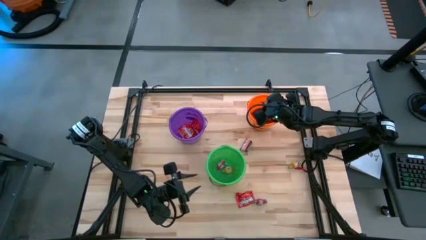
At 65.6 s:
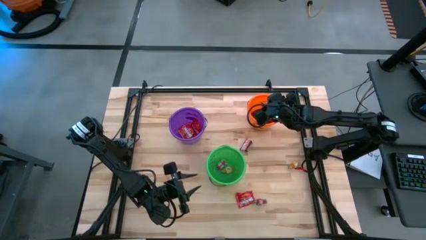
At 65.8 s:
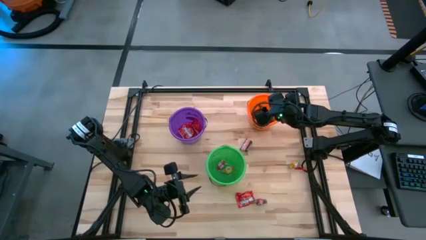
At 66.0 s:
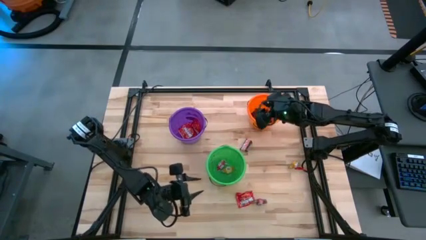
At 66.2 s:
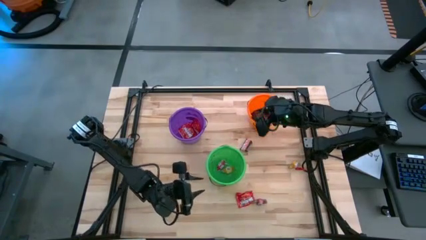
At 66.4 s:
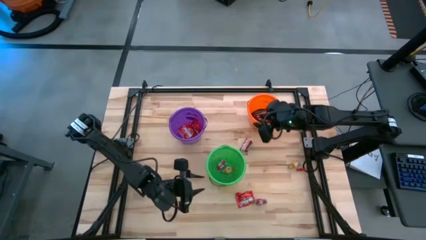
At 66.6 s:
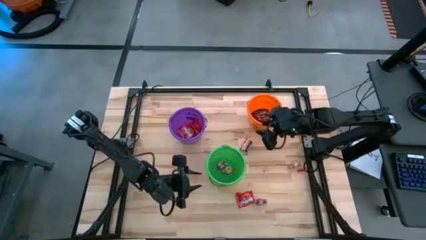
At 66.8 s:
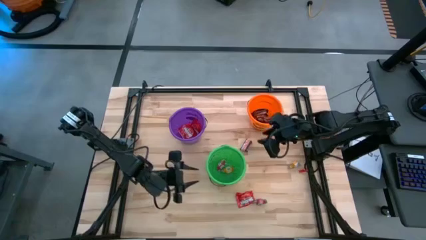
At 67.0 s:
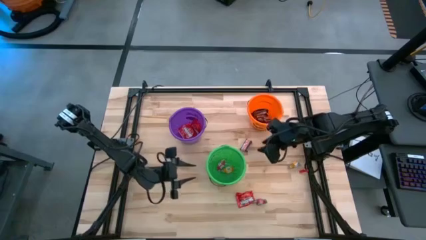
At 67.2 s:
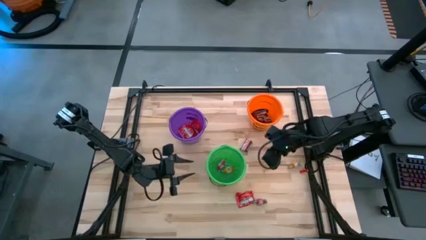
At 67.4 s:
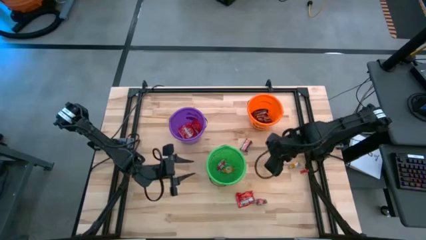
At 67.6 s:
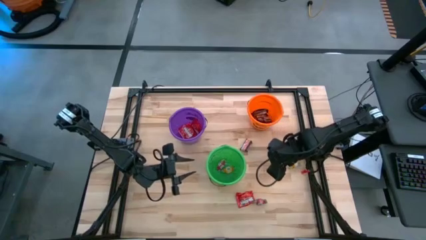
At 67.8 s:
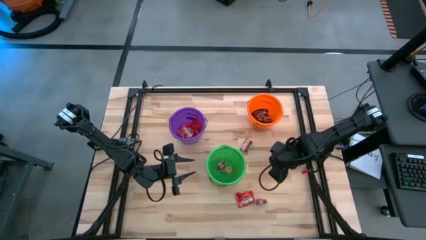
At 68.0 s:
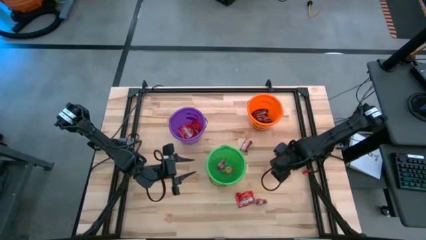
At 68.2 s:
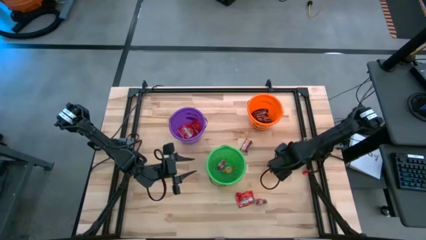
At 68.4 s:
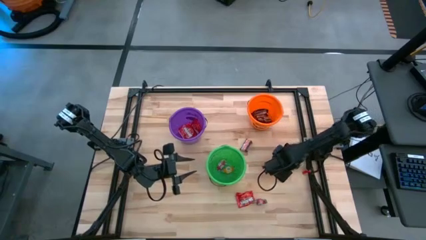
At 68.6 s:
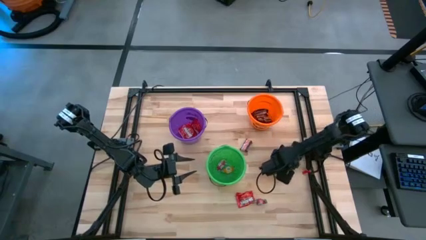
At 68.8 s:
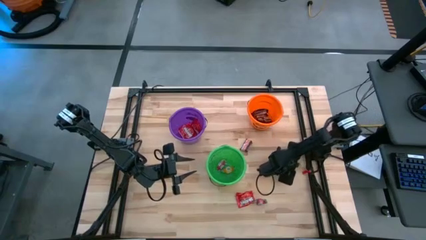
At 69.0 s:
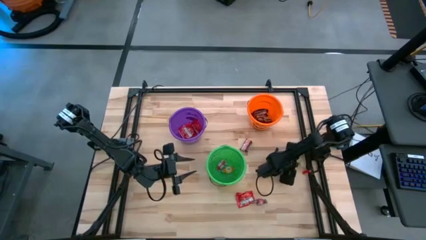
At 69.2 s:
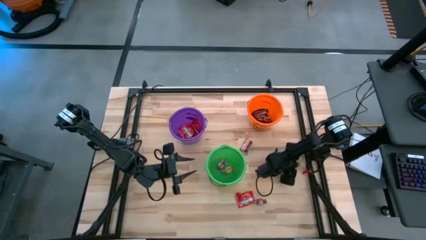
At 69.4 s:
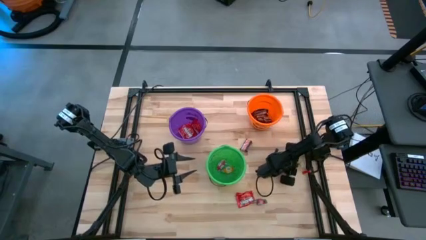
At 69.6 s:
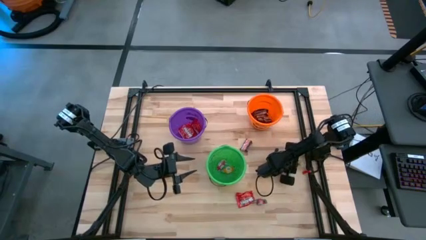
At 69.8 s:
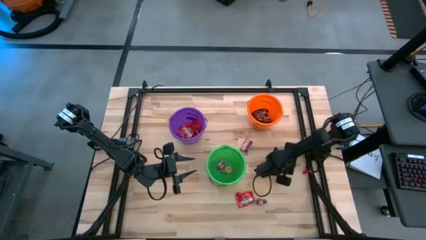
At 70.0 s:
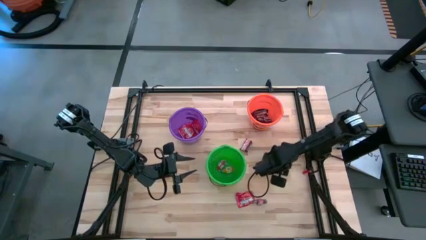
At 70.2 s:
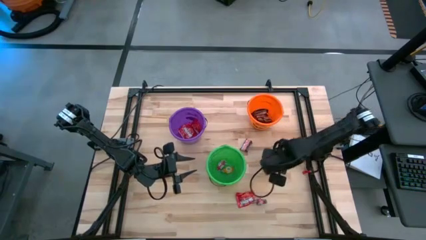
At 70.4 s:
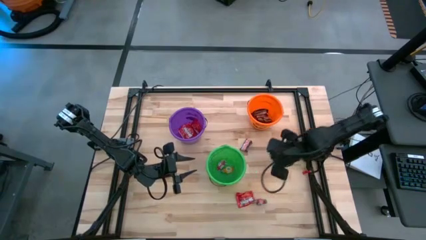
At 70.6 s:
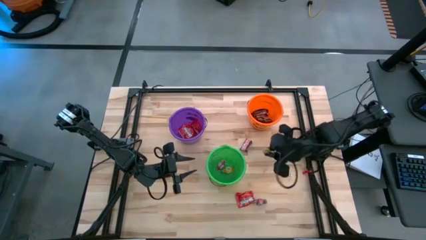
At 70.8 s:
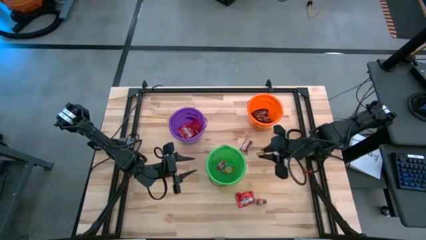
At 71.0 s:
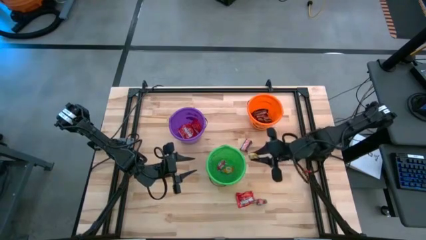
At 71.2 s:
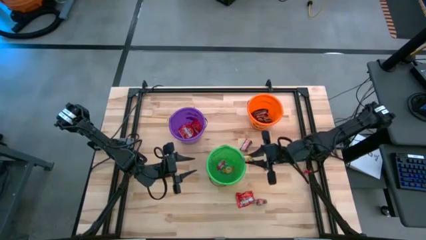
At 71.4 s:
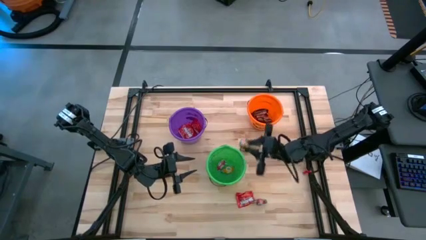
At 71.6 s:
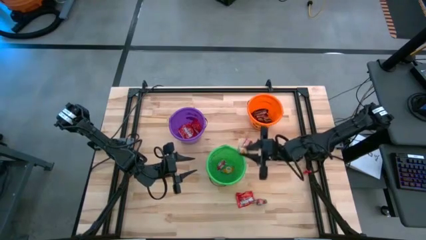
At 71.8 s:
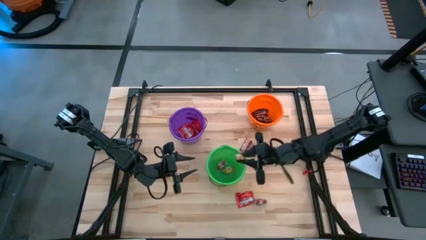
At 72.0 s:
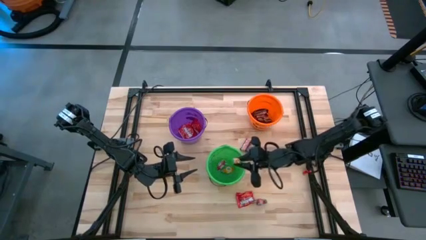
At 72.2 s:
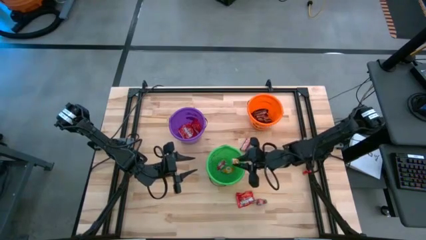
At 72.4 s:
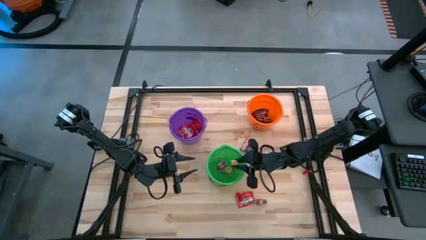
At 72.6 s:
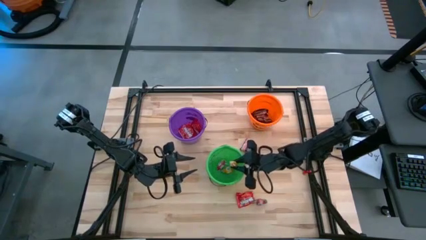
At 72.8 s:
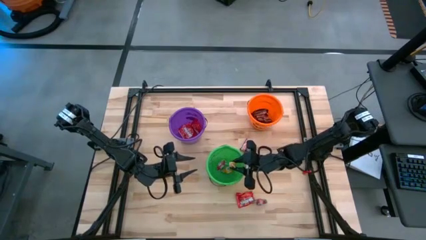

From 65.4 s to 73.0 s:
Task: Organize candy in baskets
Put the yellow candy into the green bucket

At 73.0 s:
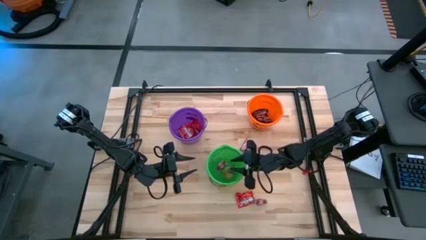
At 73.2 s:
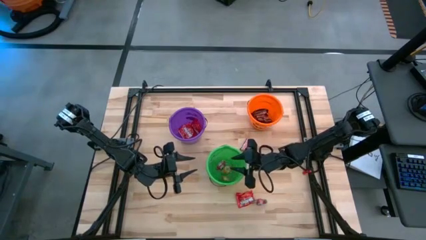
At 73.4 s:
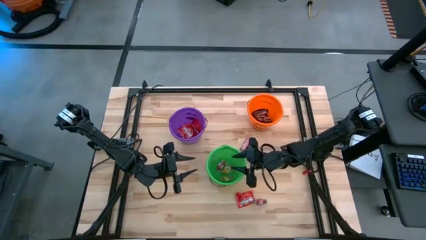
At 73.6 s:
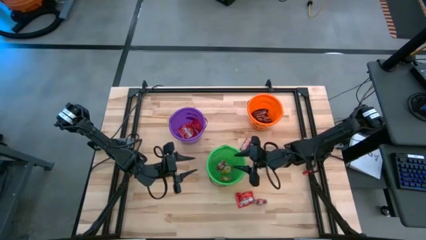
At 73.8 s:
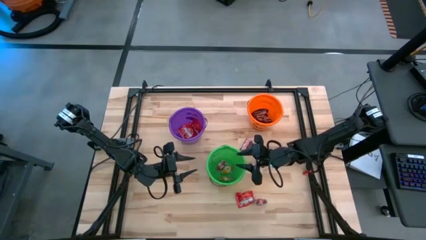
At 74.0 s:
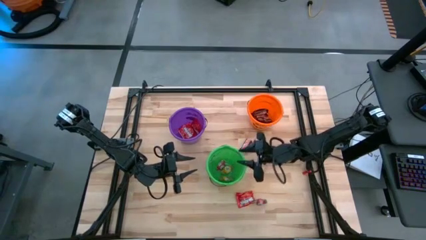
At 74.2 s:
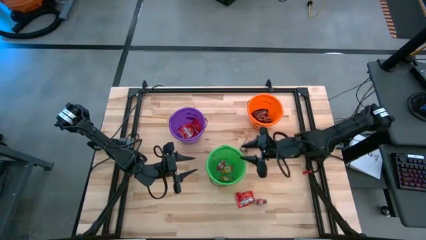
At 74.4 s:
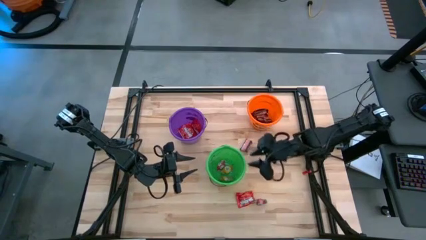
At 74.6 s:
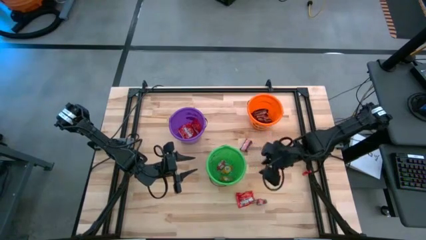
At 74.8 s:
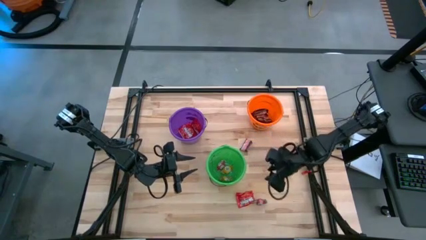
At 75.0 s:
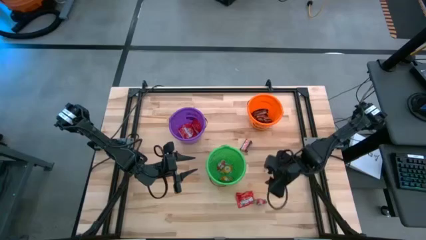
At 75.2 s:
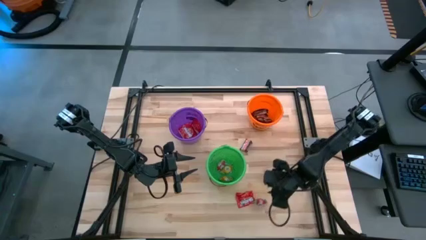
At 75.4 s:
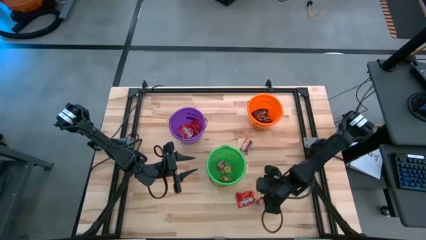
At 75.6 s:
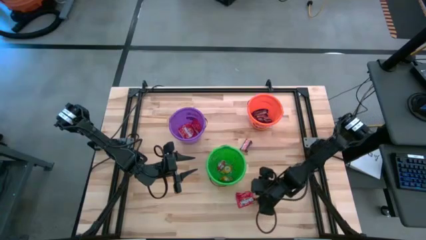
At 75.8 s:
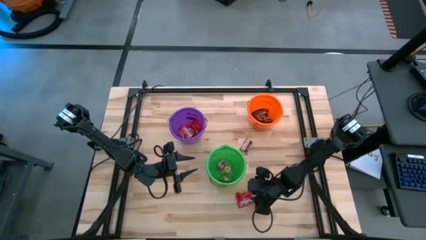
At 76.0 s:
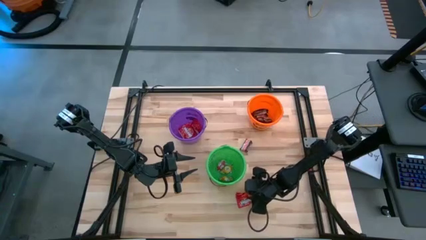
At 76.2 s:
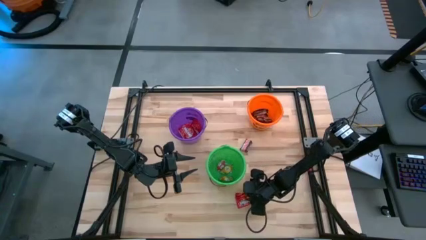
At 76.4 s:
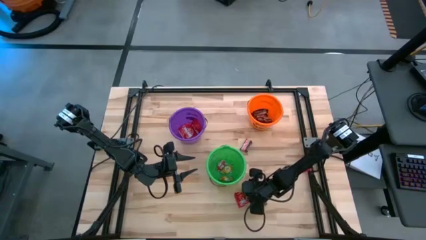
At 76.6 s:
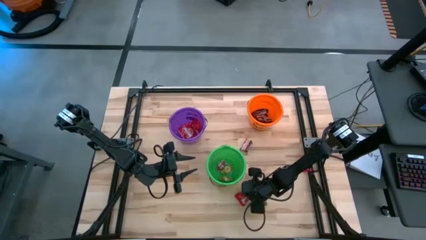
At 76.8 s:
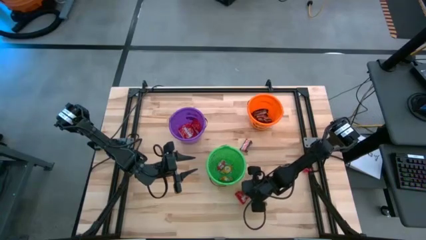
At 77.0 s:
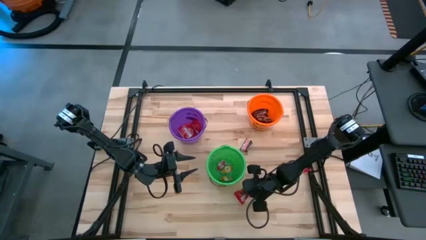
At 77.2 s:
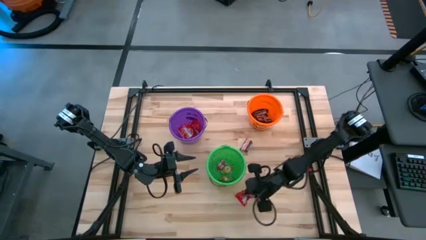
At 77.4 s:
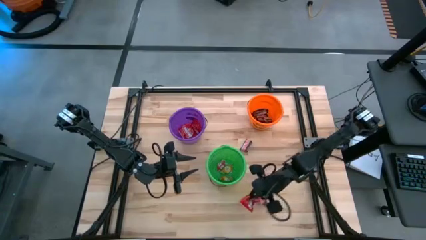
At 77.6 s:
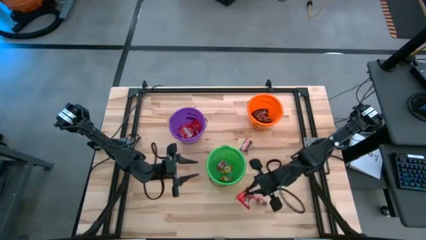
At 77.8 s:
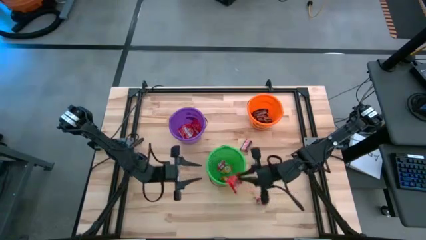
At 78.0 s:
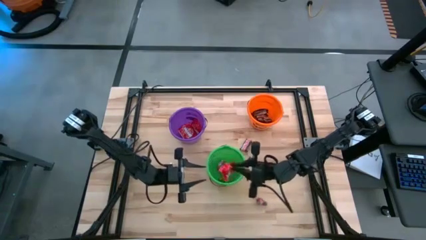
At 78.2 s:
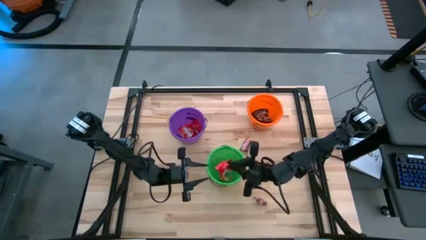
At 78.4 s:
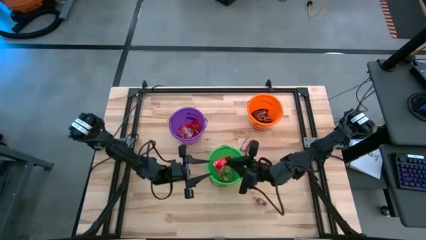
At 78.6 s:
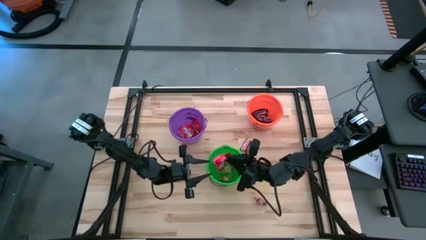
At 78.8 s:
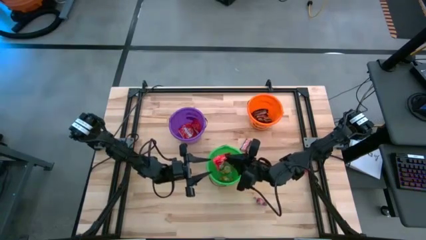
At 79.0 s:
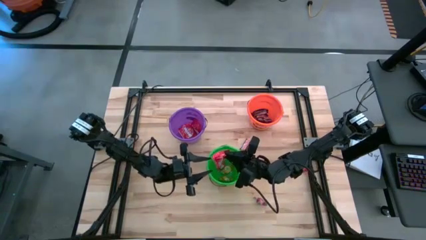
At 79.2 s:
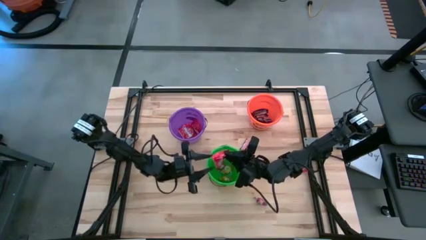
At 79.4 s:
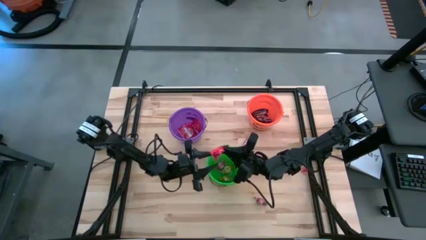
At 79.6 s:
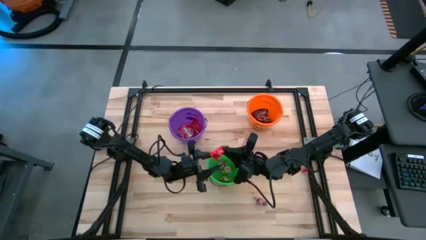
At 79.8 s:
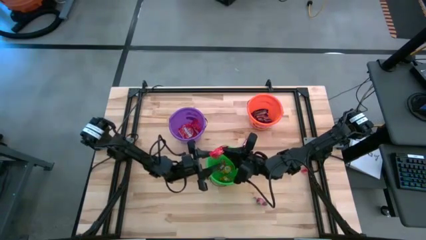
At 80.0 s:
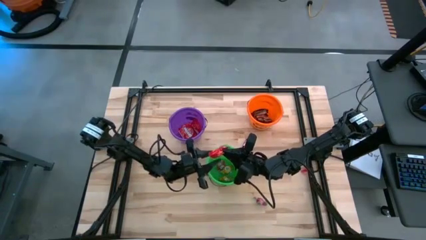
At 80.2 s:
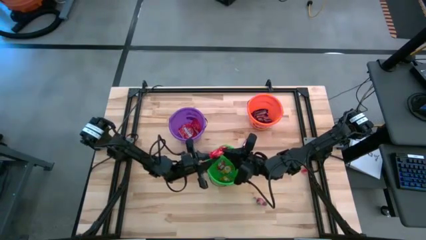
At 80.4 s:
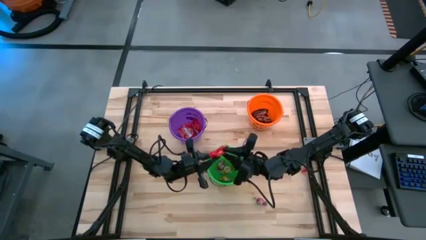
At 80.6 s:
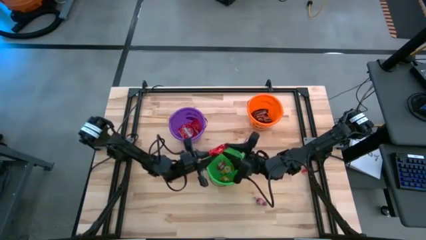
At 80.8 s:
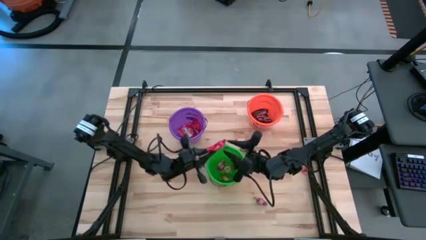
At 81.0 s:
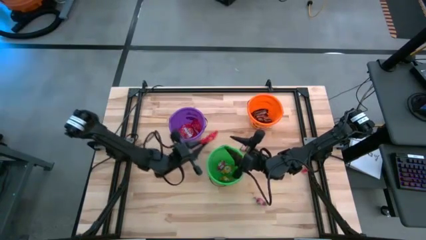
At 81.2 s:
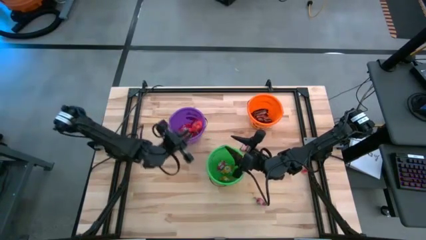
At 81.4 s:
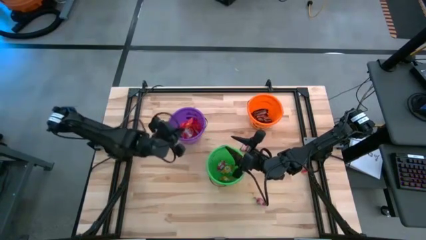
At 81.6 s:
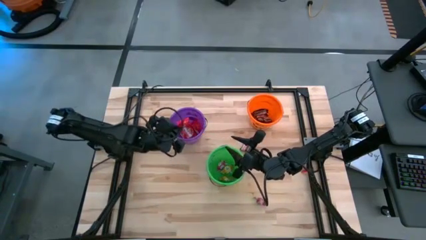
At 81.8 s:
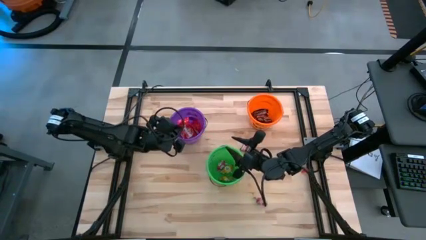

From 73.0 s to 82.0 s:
Put the red candy into the purple bucket
